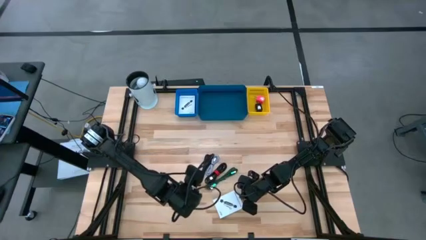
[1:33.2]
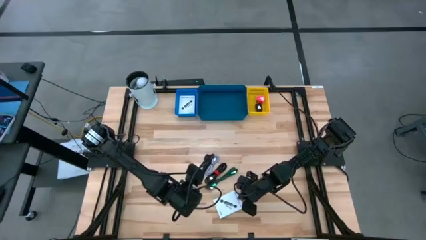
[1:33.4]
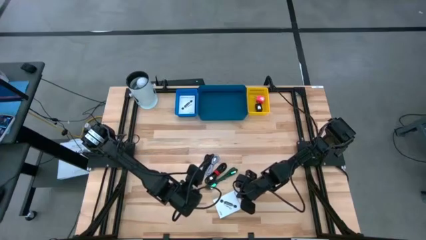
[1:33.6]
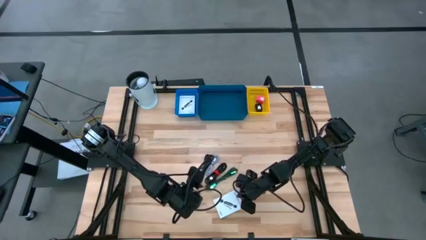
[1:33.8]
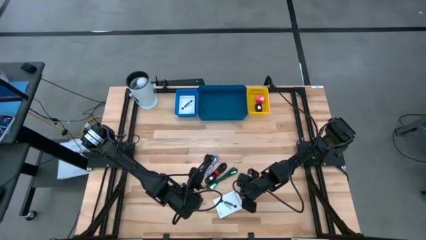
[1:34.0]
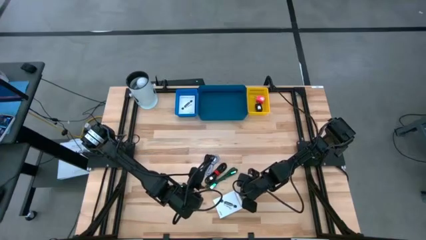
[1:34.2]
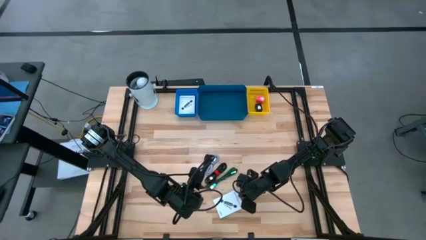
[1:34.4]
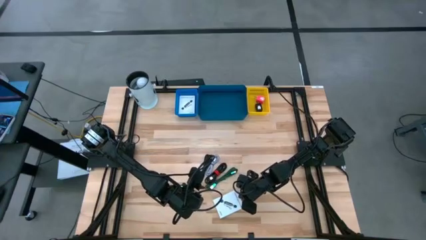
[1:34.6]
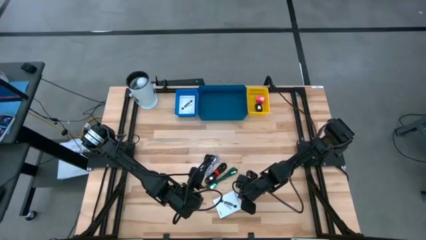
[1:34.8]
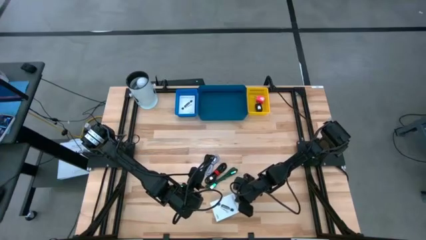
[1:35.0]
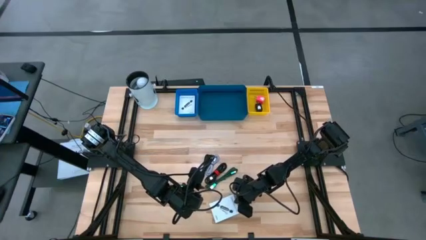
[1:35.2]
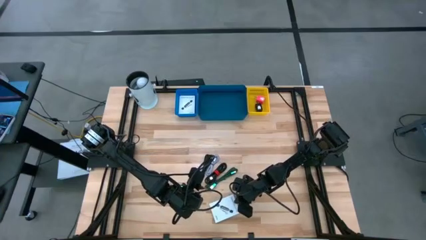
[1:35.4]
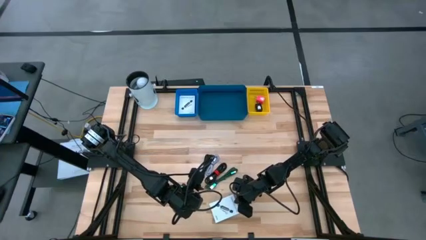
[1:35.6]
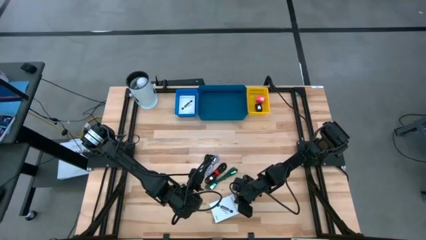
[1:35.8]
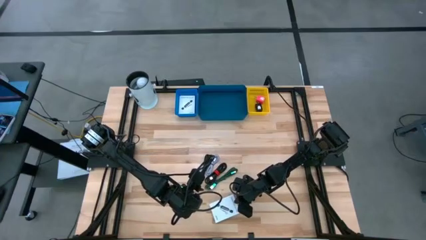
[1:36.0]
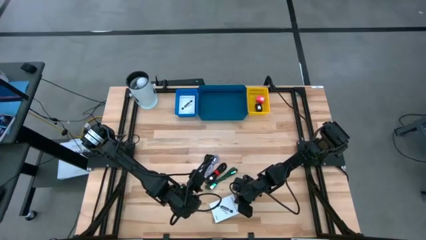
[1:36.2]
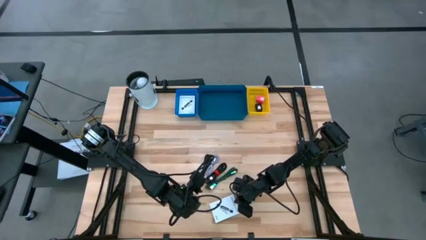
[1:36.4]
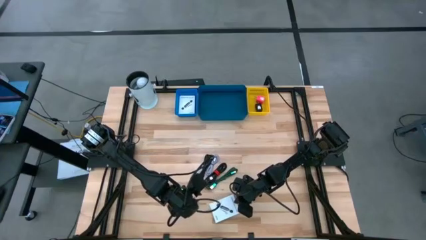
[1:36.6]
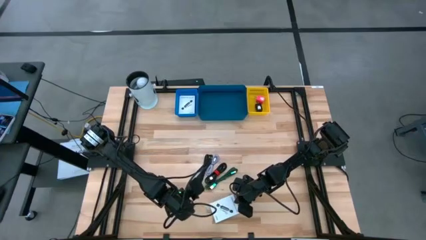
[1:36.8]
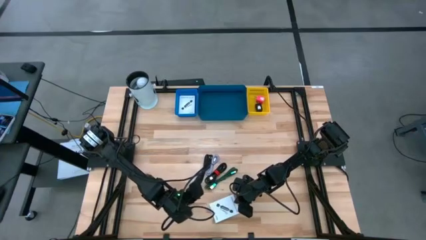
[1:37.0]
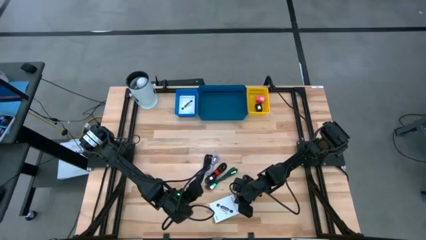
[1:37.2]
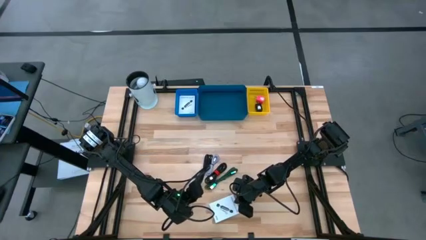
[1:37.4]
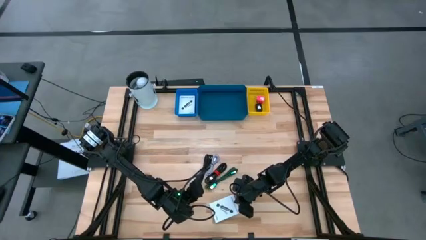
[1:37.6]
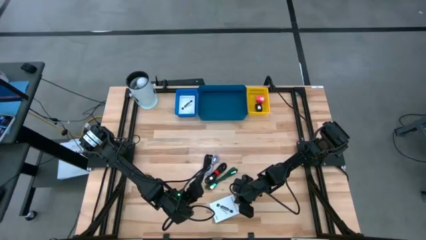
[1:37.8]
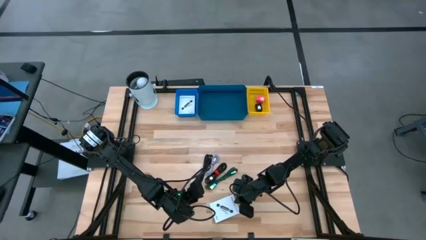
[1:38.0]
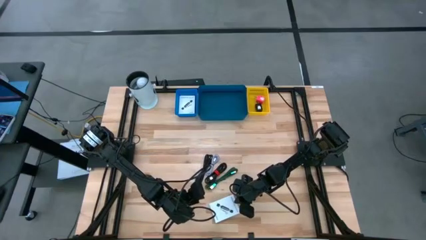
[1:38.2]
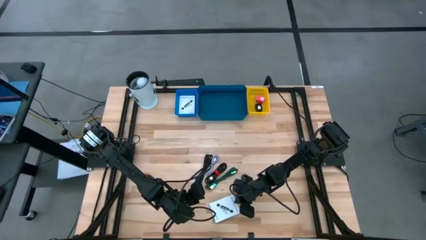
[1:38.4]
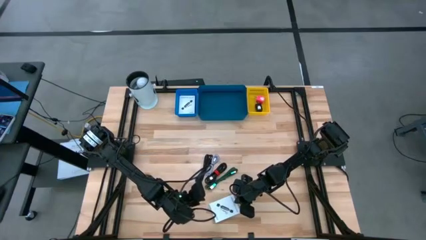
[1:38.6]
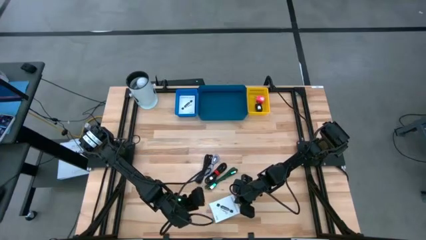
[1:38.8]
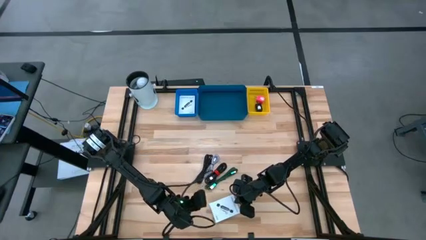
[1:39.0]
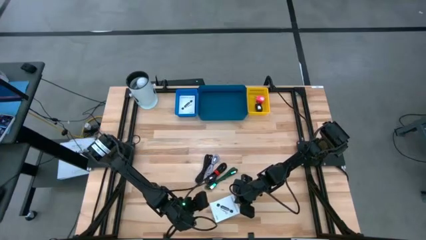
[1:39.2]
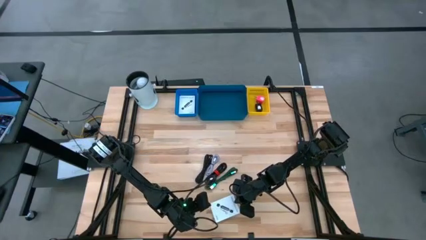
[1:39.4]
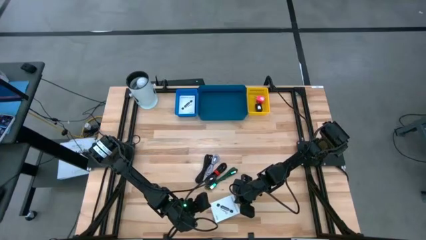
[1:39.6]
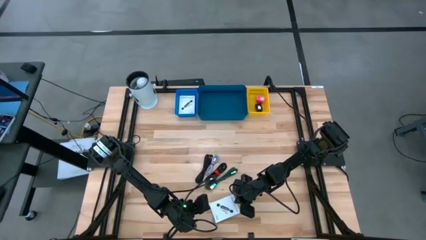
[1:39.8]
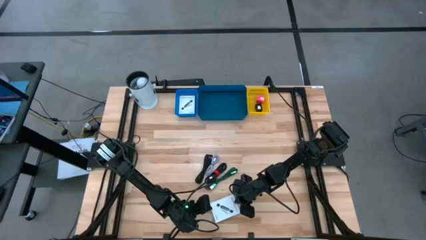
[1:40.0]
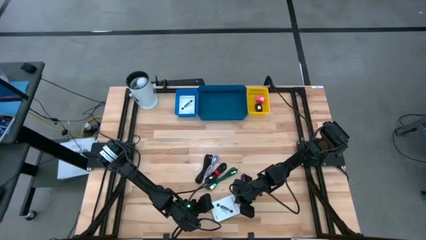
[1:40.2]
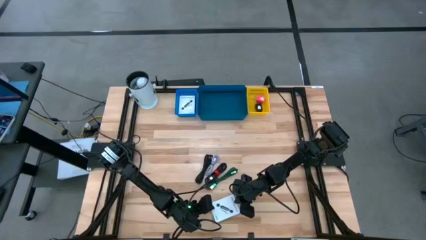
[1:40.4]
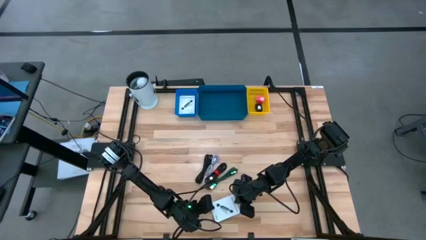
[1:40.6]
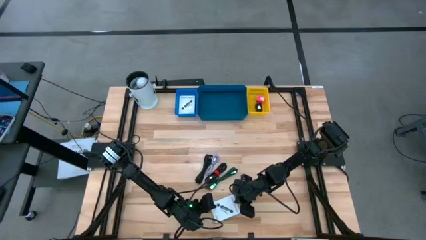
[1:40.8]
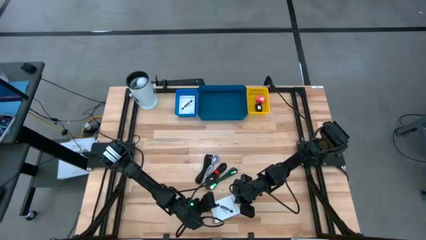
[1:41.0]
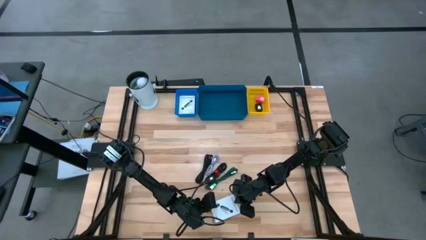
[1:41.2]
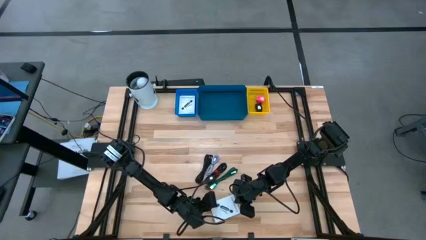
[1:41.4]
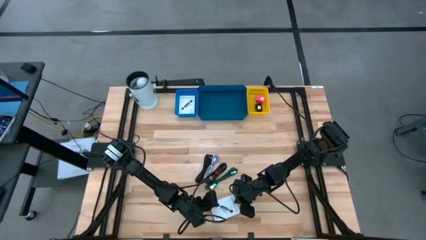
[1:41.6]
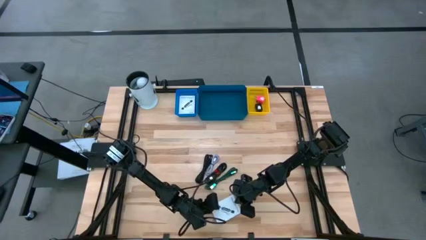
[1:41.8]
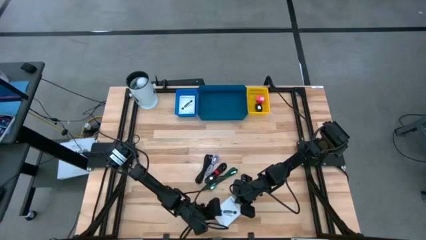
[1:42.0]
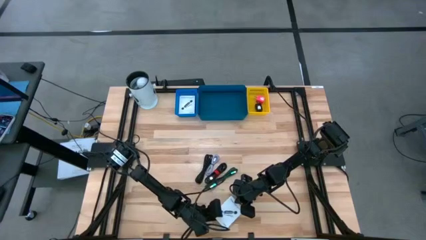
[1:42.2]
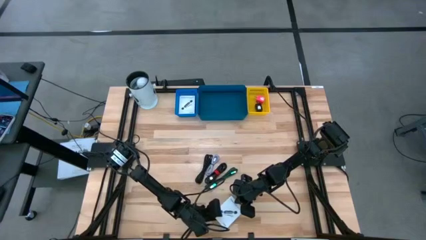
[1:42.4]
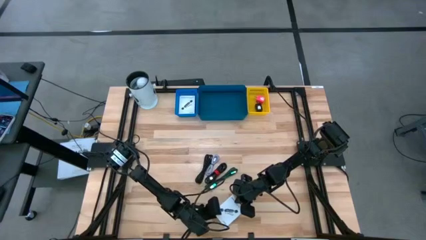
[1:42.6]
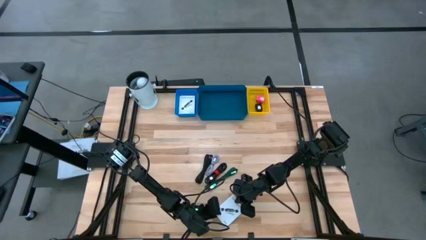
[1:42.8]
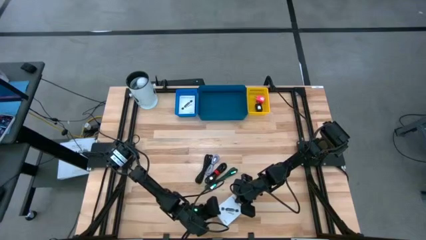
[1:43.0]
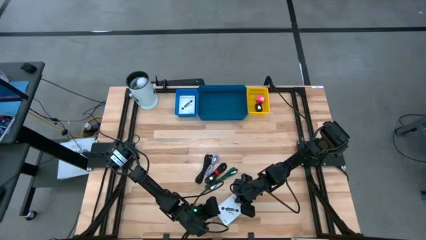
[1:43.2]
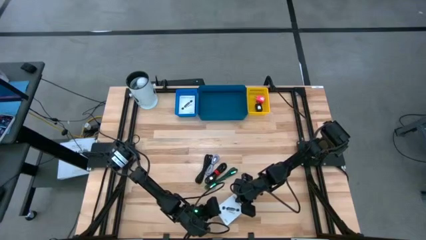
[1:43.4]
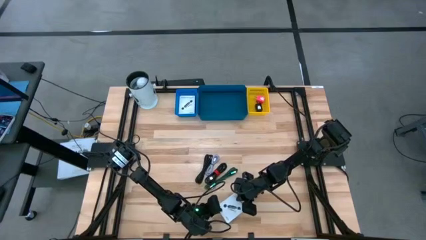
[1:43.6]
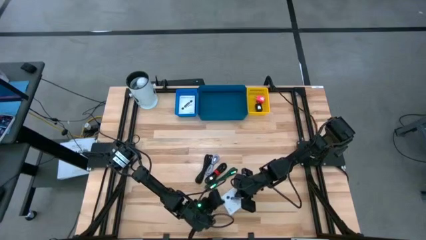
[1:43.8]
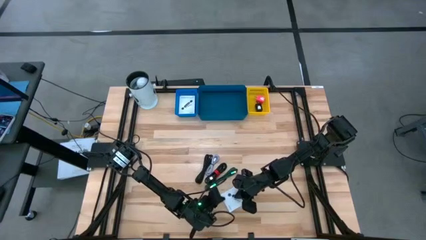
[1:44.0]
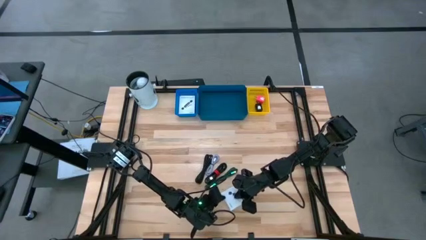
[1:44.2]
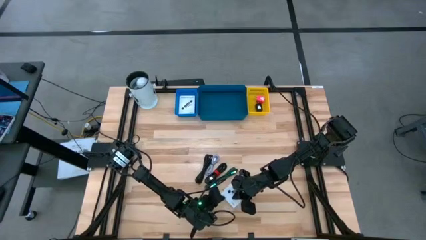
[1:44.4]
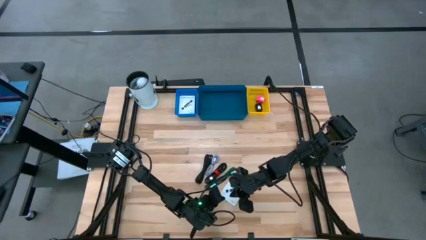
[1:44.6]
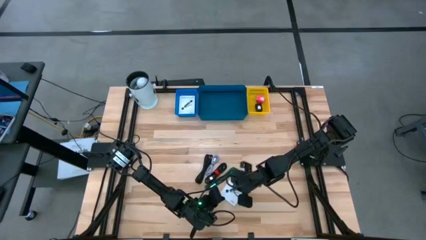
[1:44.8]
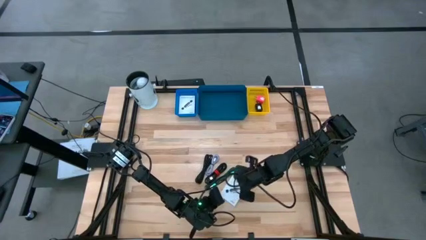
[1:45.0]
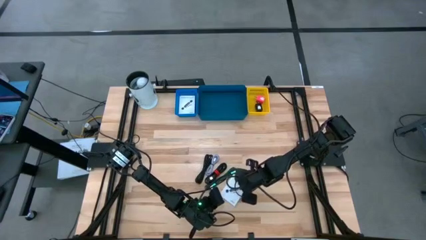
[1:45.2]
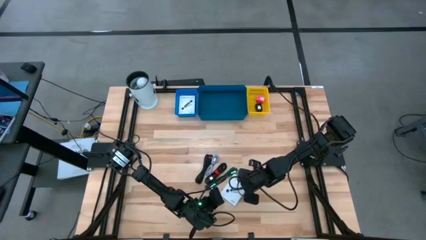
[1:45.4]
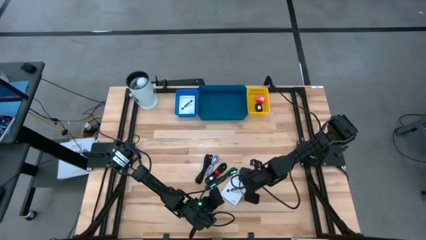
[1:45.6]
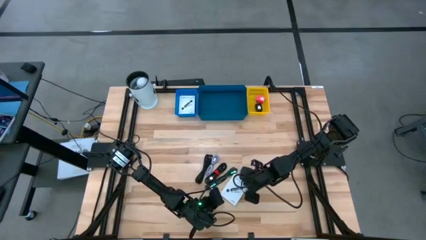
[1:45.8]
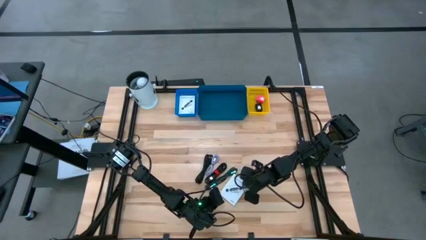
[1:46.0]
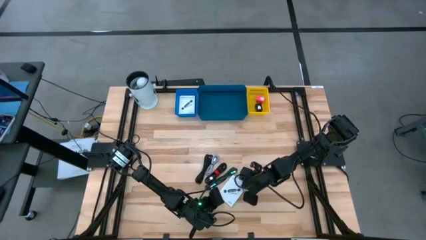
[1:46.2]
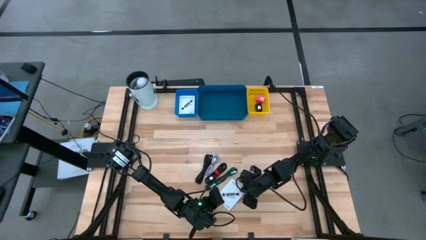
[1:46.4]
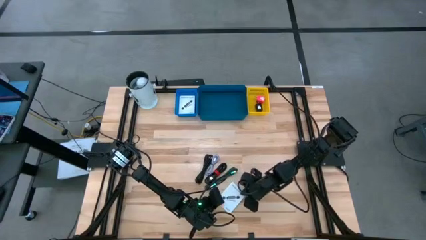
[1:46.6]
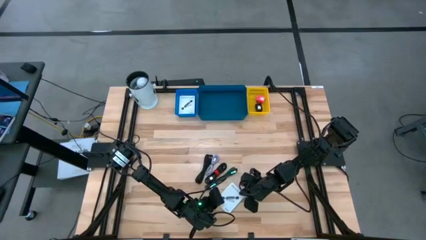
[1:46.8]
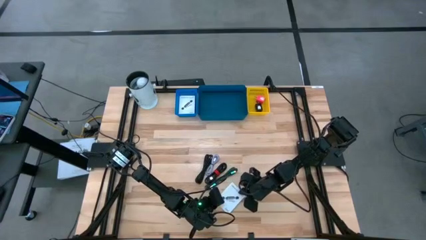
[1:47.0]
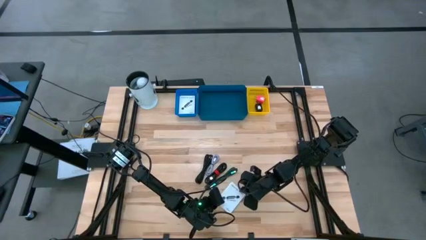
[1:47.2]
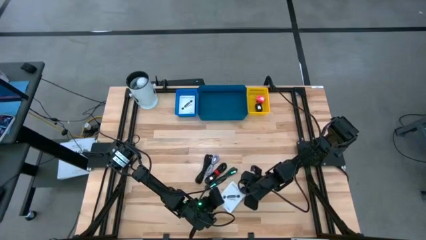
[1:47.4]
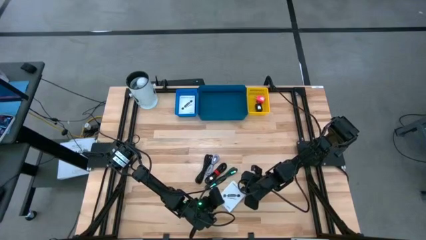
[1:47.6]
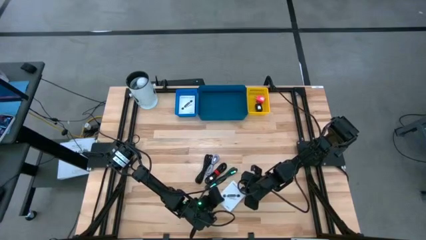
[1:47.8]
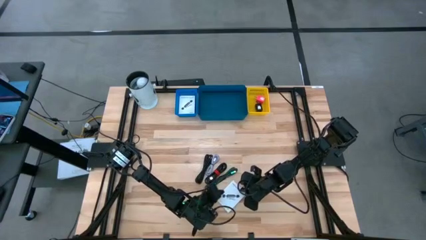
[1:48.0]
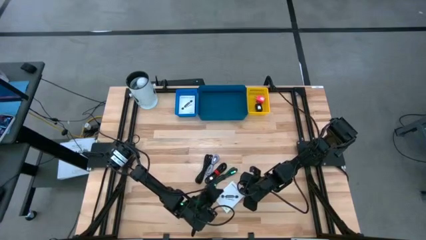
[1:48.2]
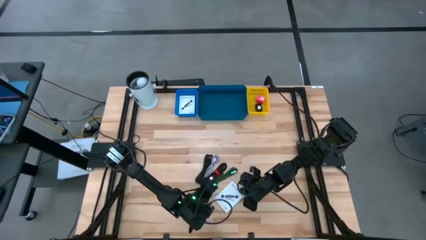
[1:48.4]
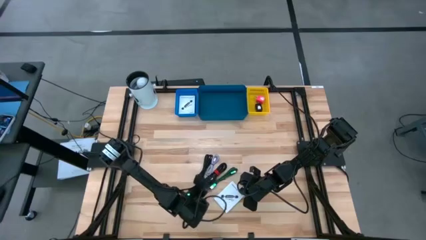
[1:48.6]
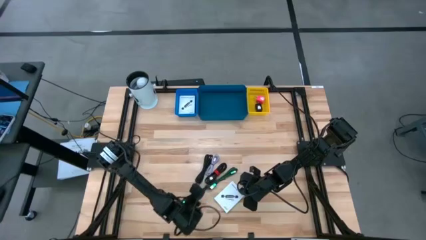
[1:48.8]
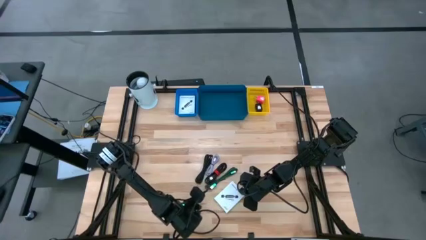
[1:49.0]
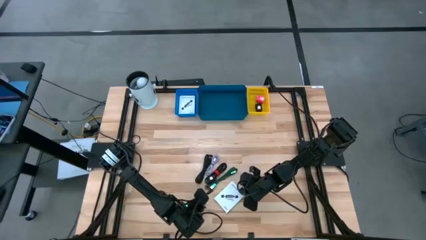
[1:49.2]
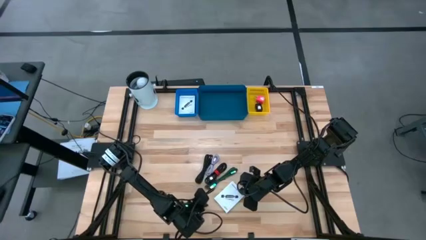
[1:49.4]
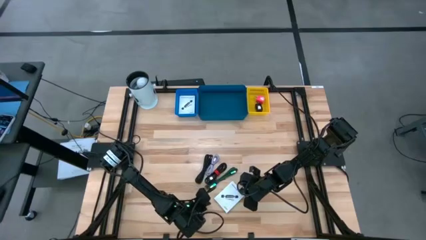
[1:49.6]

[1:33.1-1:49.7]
Task: Pick and place items into bin
Put the card reader box into the blue basket
